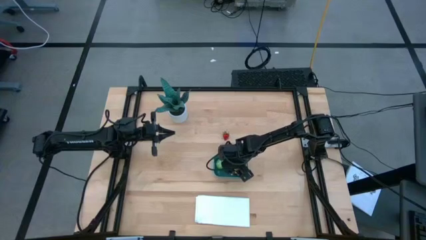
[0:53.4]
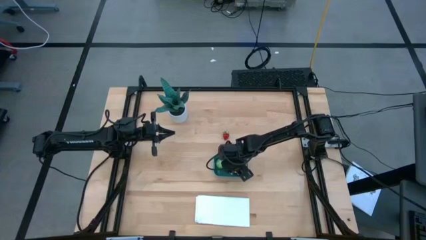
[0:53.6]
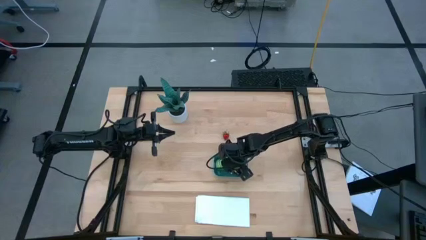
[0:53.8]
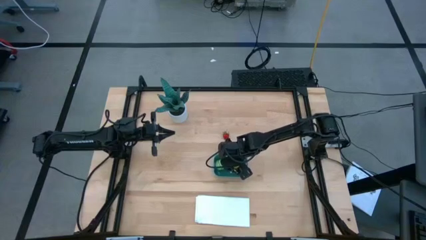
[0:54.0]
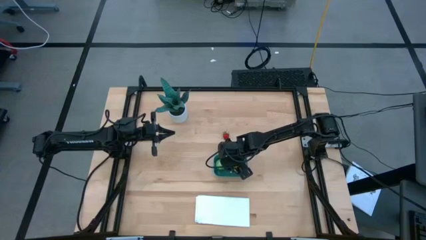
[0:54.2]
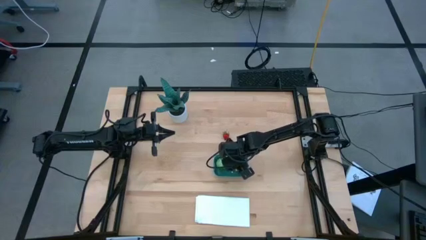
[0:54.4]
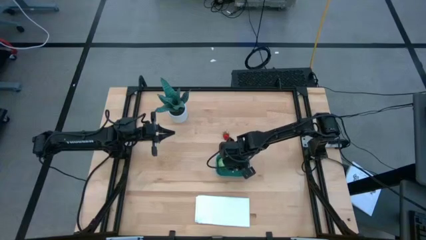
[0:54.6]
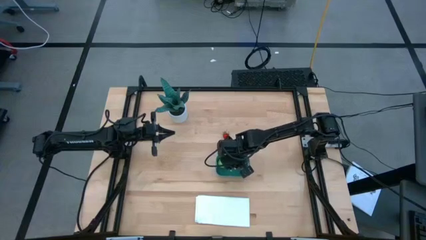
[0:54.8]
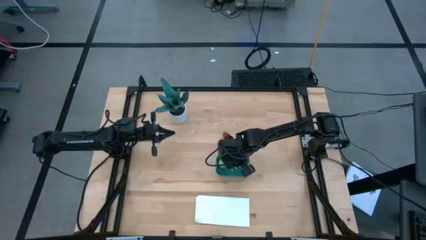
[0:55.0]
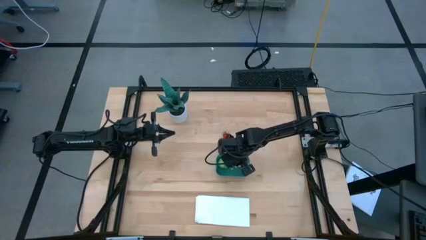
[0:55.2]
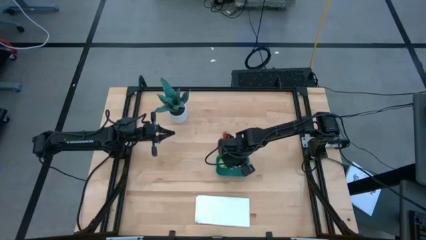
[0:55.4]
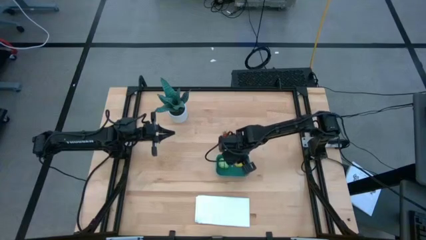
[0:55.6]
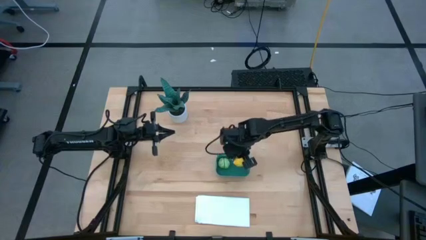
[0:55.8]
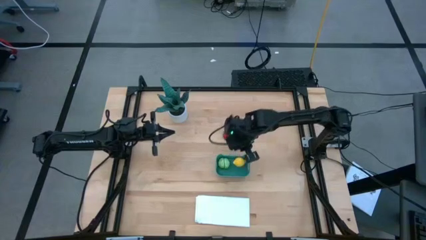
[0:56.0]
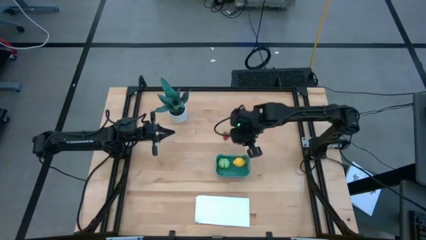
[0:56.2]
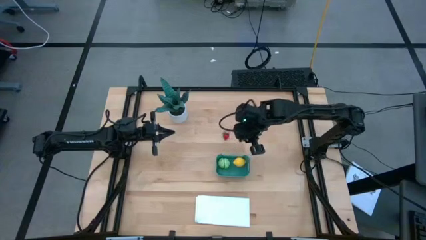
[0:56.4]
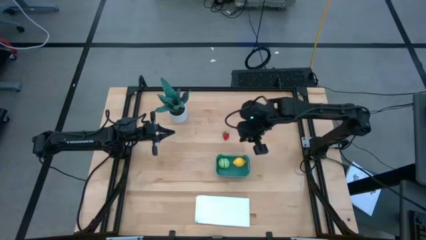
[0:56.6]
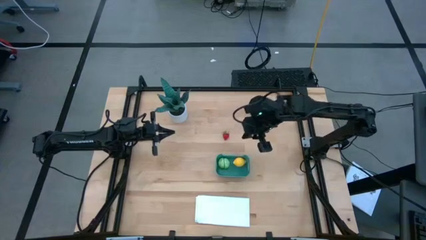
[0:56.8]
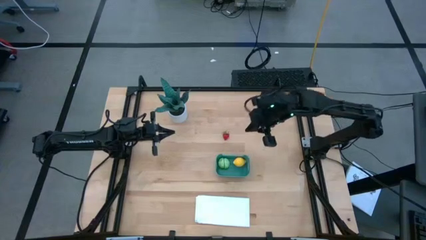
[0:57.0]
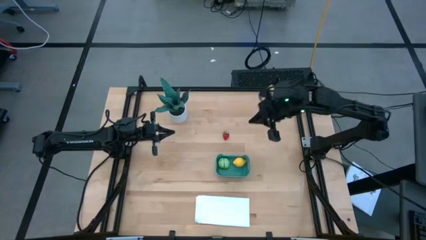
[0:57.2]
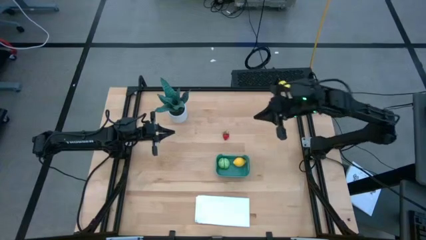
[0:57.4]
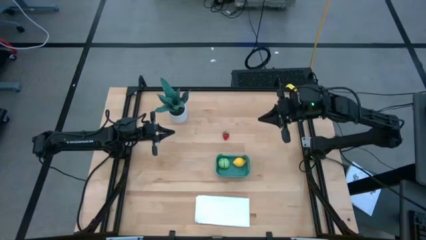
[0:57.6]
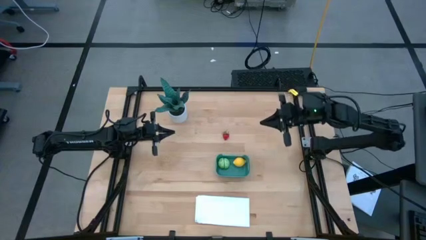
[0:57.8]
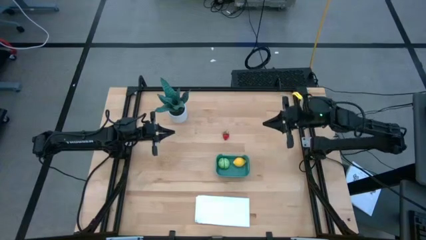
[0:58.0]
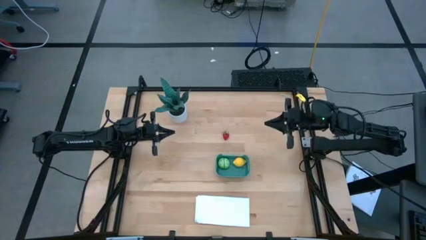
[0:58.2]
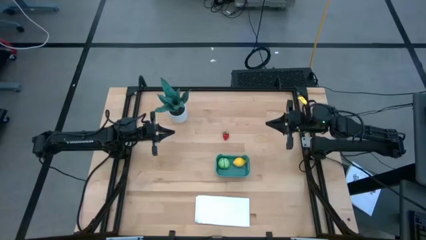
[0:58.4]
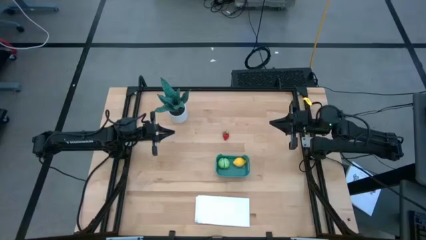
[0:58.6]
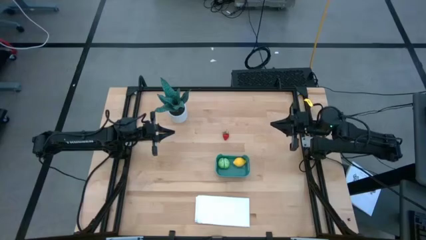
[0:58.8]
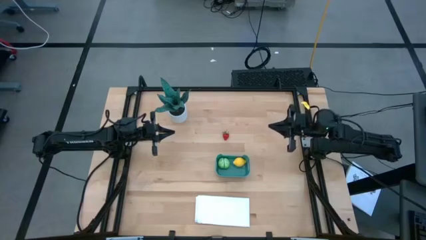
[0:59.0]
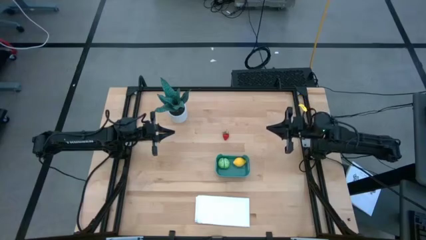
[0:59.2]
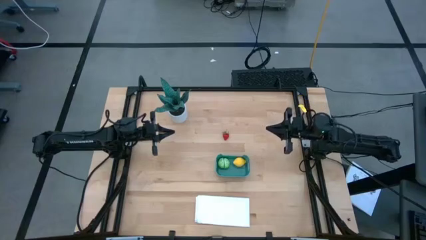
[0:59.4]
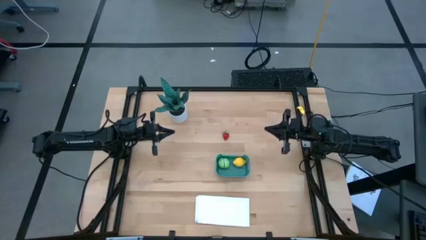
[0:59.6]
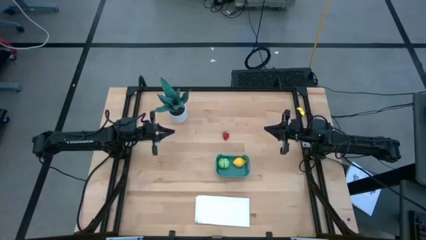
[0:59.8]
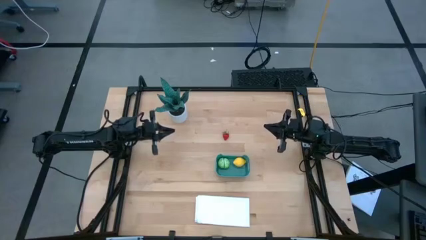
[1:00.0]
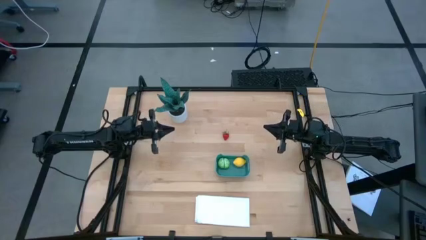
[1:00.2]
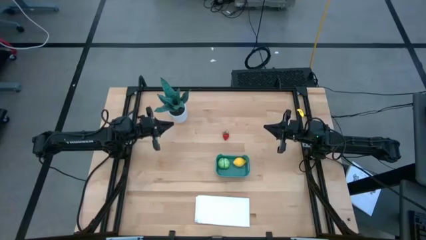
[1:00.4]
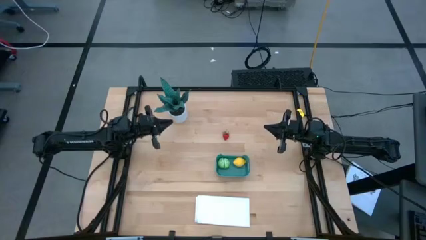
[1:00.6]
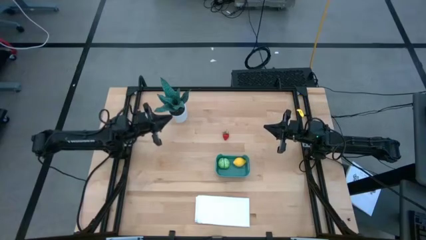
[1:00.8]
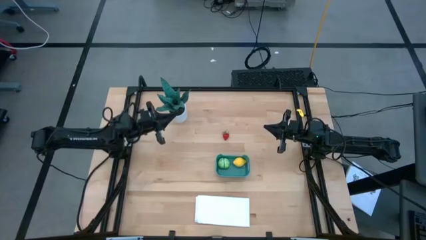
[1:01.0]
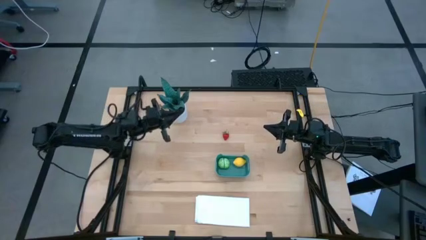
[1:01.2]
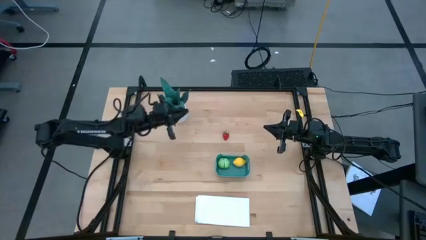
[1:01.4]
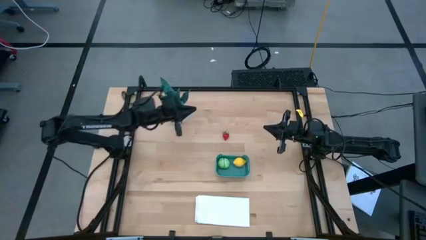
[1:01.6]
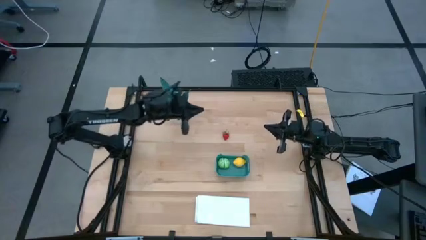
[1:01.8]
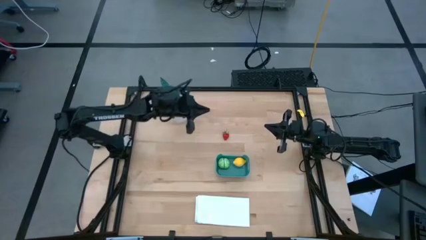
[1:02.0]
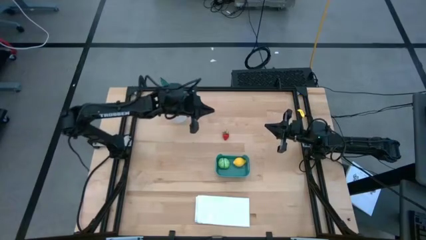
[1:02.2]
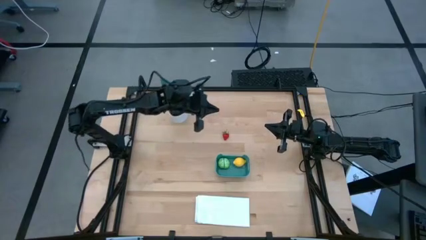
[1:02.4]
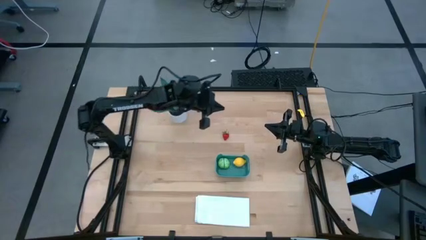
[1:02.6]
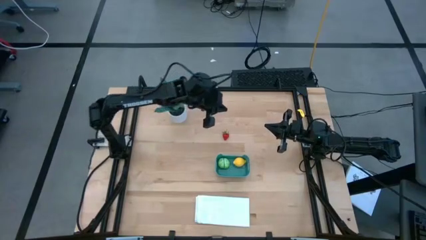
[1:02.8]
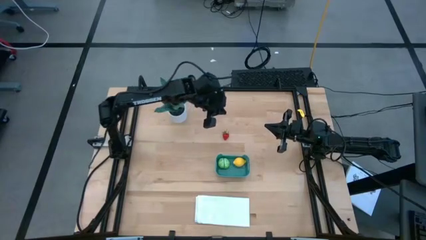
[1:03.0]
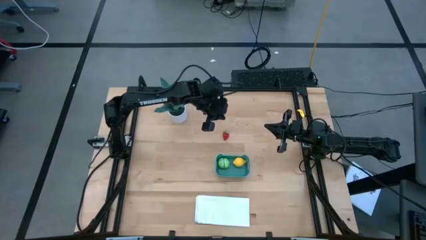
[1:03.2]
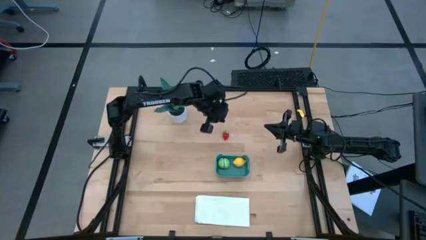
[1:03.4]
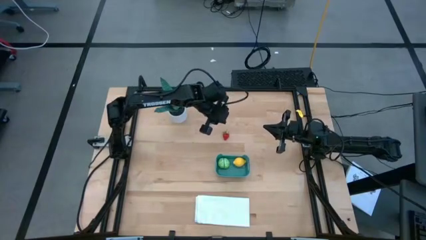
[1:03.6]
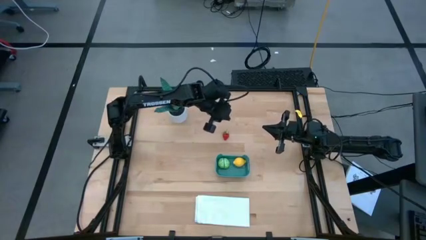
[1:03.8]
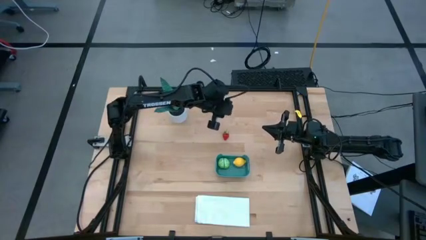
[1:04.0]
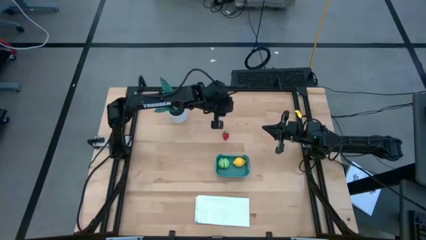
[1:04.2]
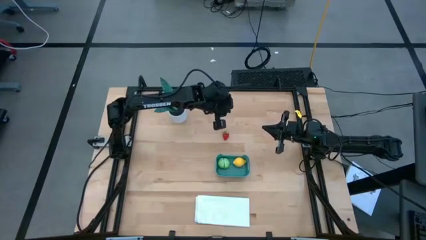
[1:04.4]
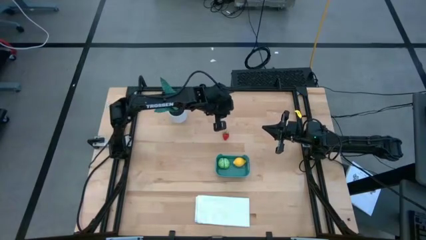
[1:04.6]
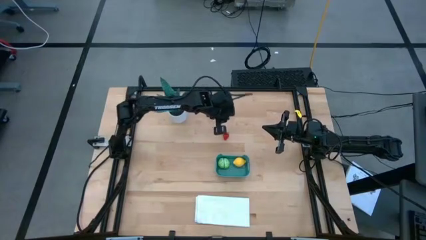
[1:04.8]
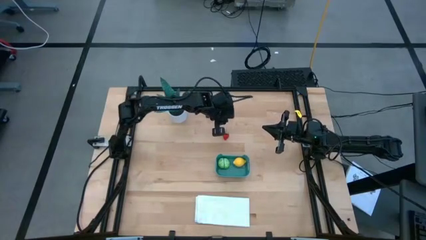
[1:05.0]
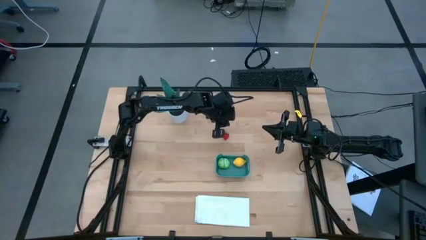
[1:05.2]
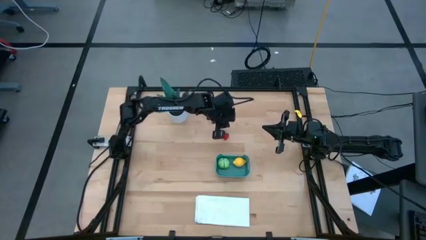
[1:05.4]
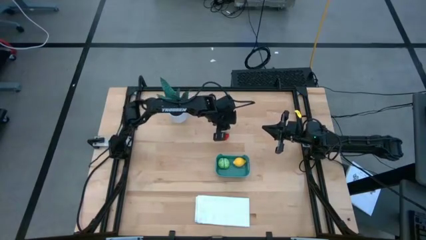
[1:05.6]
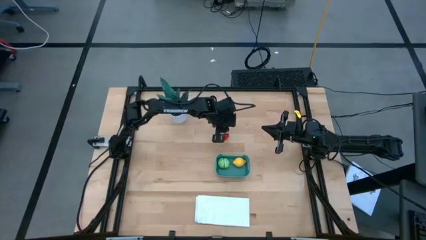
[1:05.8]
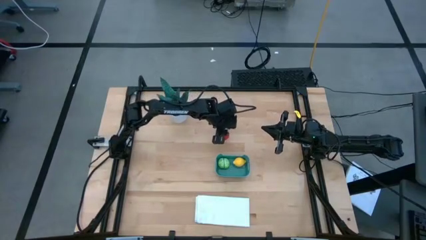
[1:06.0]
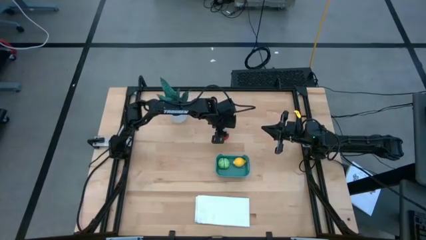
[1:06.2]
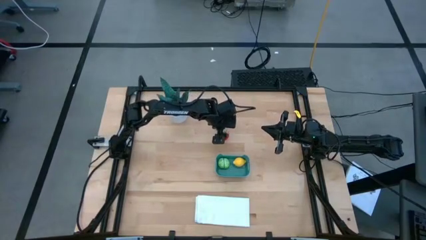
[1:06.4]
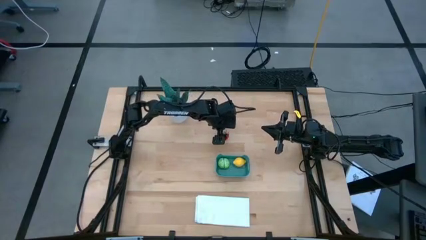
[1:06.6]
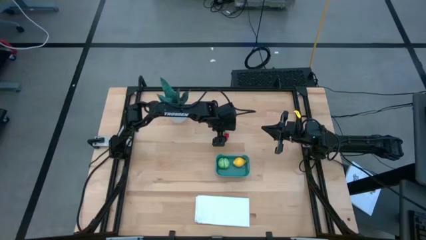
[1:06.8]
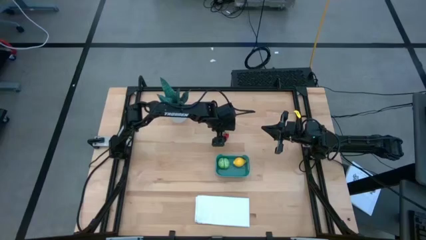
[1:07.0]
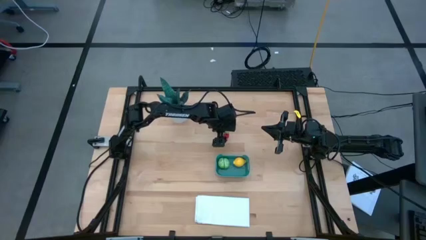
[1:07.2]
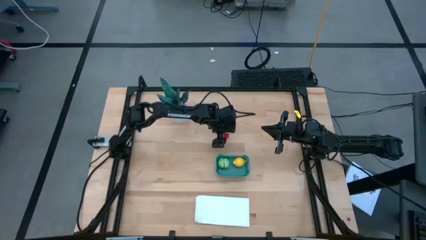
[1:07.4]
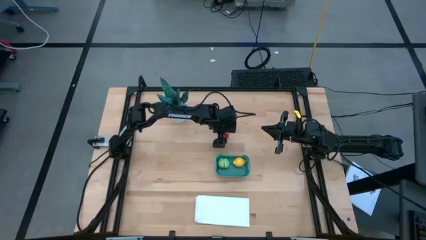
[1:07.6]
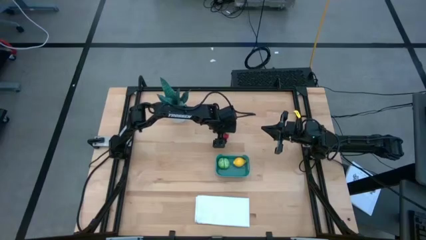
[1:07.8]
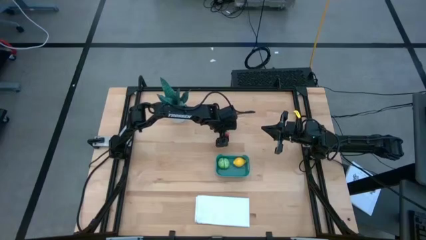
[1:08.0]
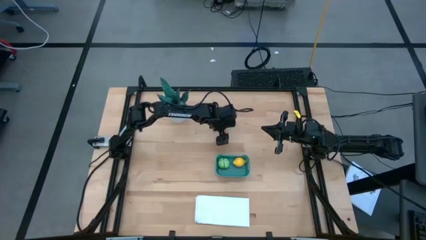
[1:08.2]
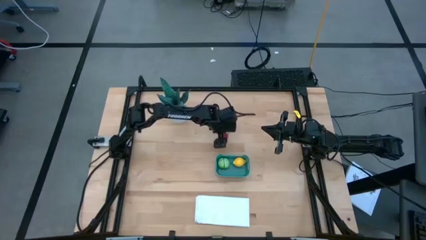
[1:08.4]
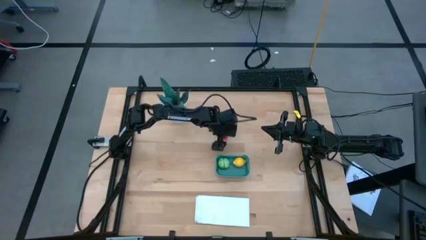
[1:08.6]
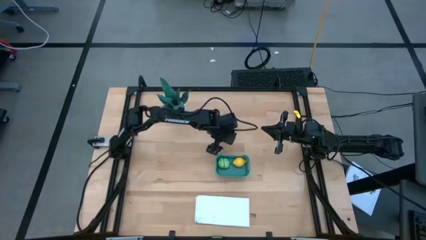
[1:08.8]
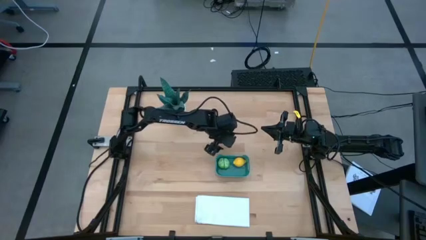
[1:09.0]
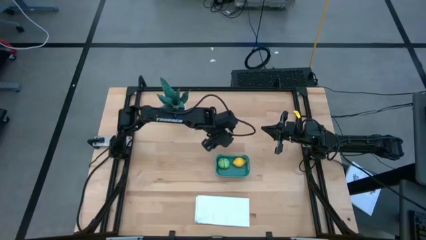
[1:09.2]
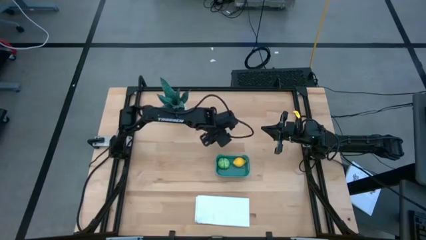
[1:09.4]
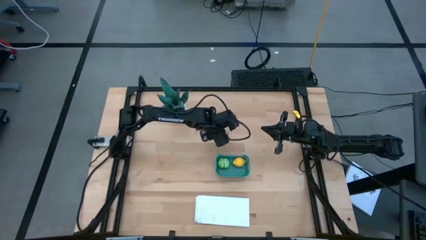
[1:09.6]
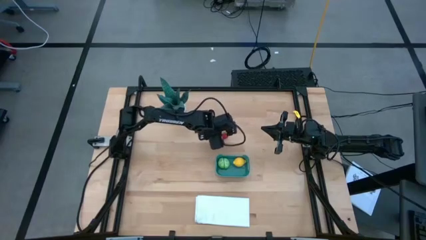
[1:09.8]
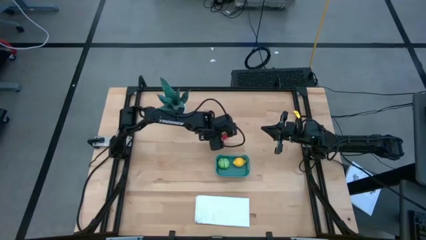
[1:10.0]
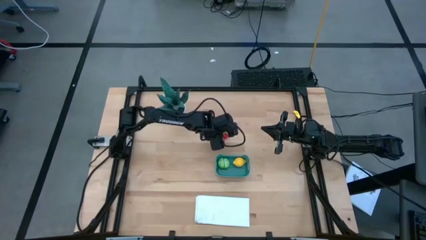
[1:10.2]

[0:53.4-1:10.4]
Task: Pick and placing Produce into tupperware
Put the strawberry into the bin
